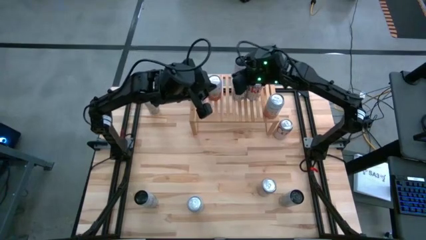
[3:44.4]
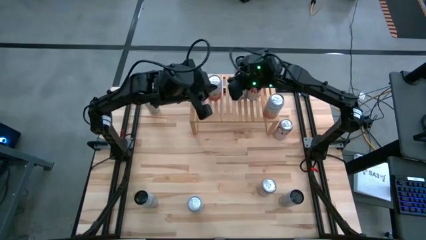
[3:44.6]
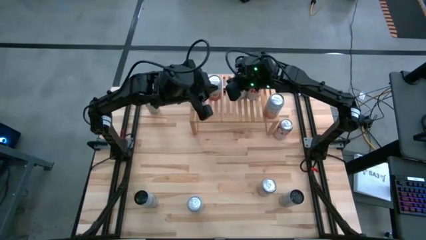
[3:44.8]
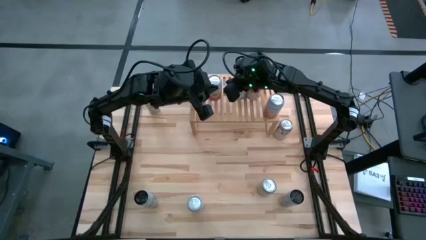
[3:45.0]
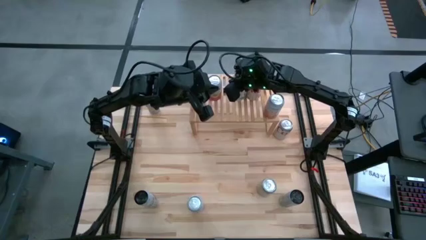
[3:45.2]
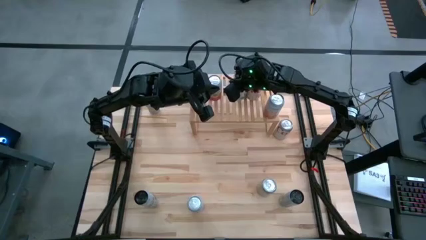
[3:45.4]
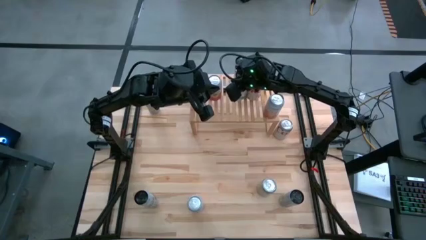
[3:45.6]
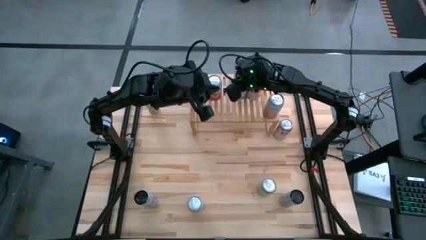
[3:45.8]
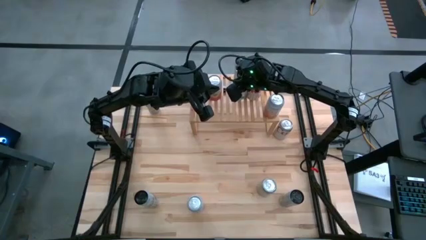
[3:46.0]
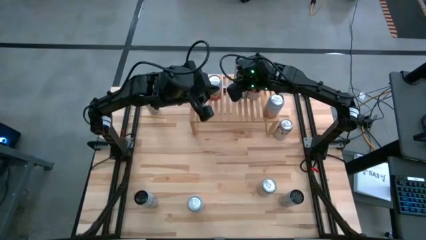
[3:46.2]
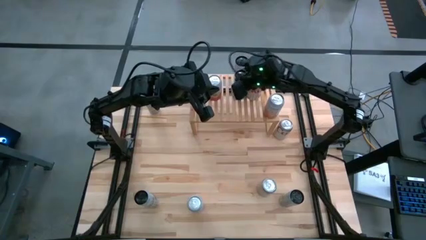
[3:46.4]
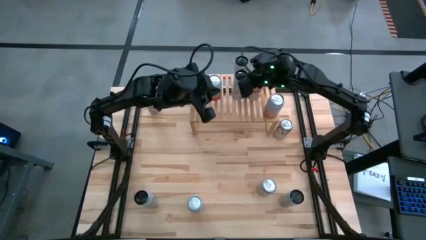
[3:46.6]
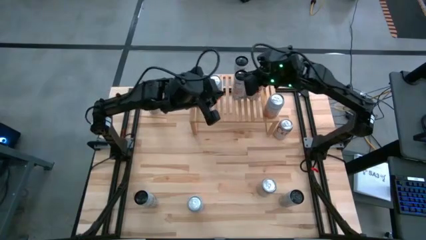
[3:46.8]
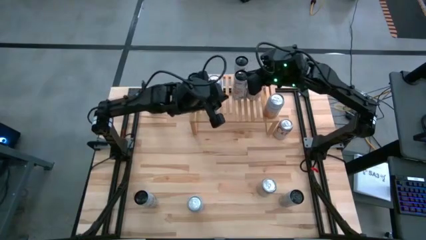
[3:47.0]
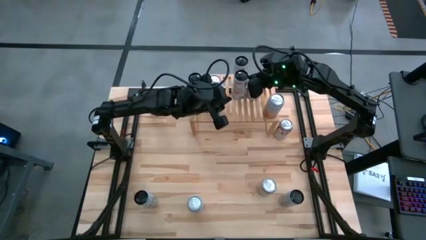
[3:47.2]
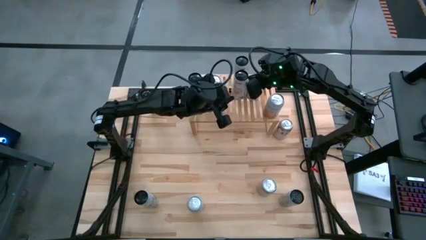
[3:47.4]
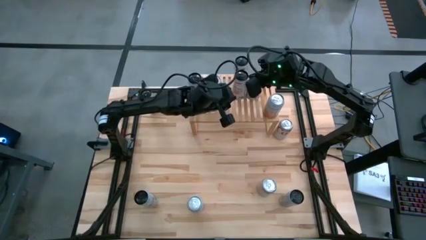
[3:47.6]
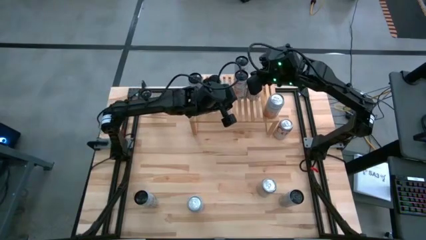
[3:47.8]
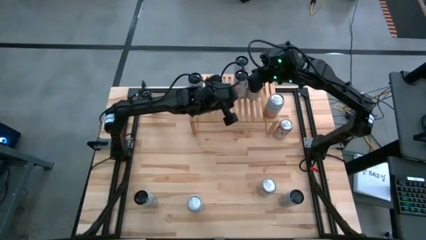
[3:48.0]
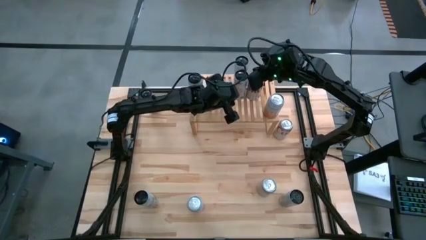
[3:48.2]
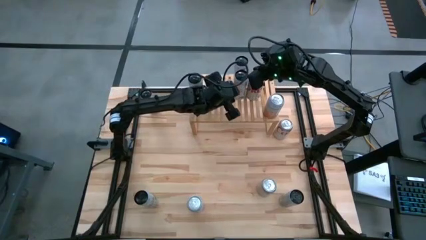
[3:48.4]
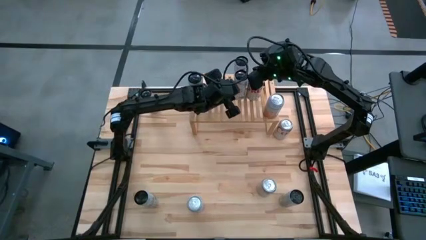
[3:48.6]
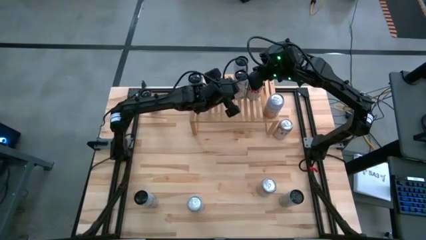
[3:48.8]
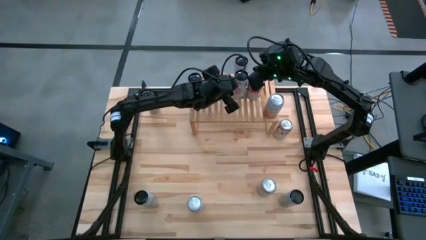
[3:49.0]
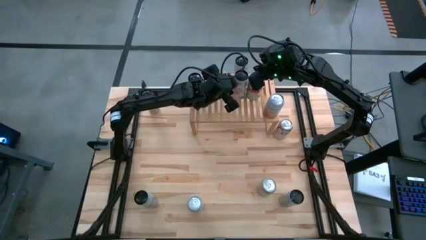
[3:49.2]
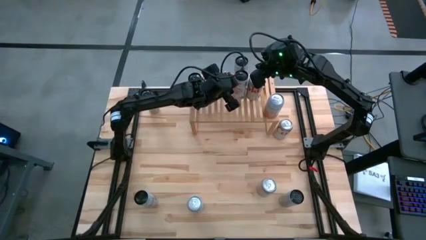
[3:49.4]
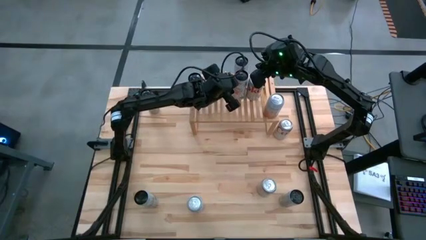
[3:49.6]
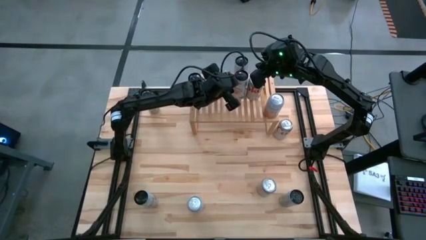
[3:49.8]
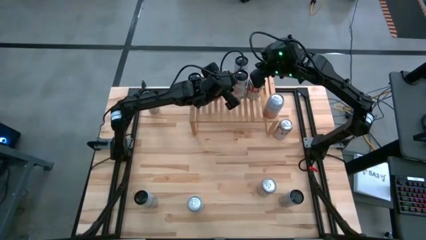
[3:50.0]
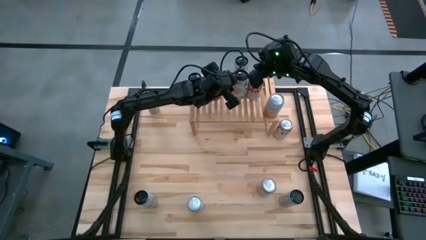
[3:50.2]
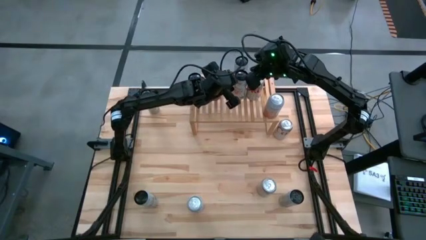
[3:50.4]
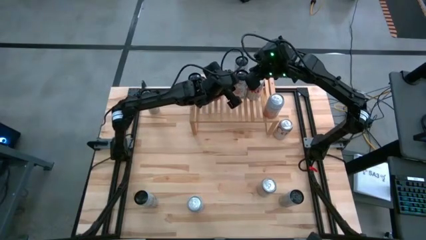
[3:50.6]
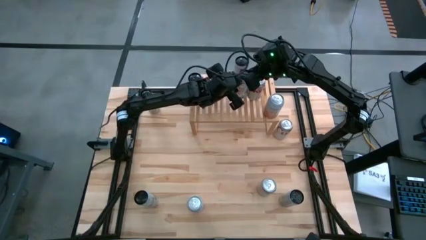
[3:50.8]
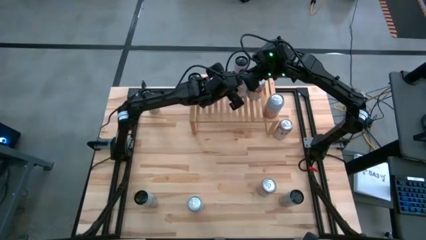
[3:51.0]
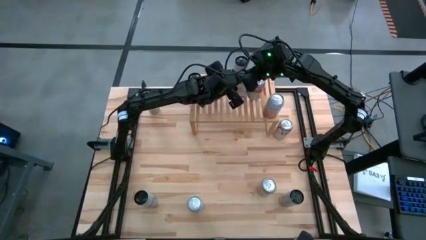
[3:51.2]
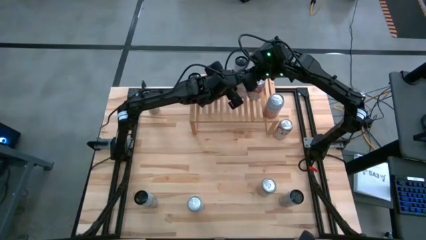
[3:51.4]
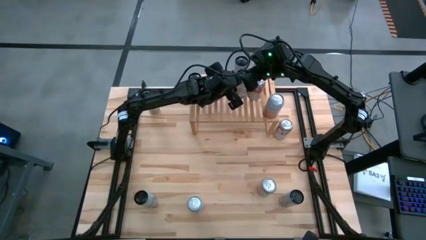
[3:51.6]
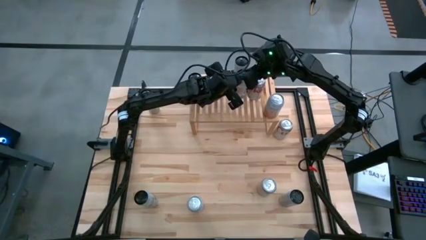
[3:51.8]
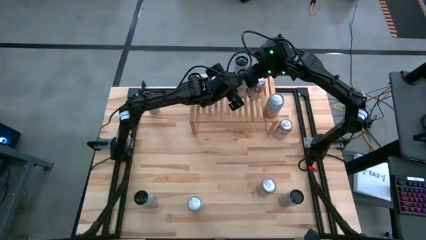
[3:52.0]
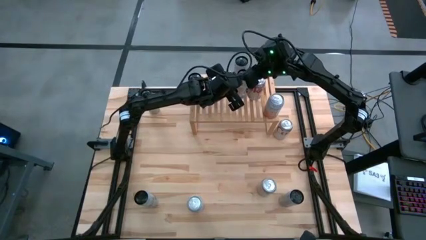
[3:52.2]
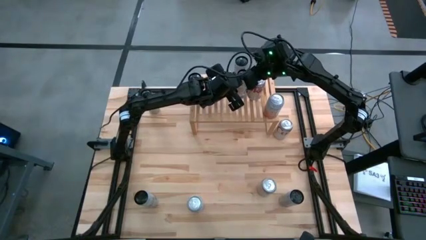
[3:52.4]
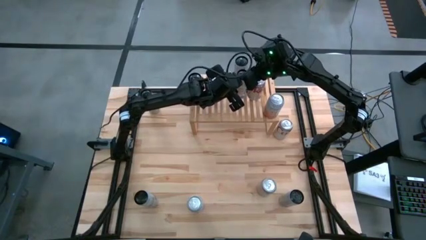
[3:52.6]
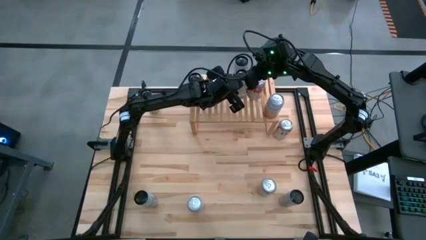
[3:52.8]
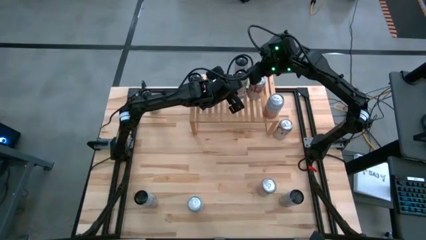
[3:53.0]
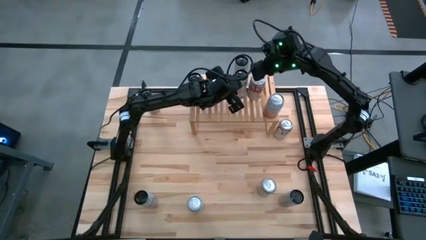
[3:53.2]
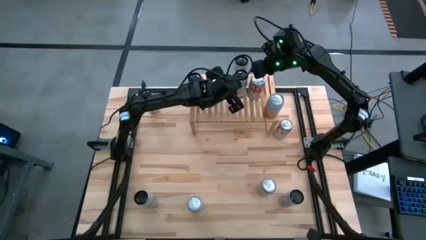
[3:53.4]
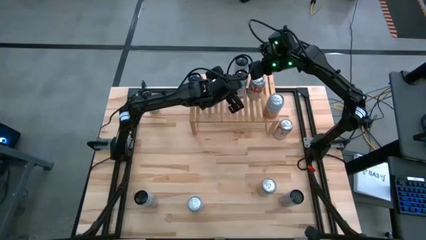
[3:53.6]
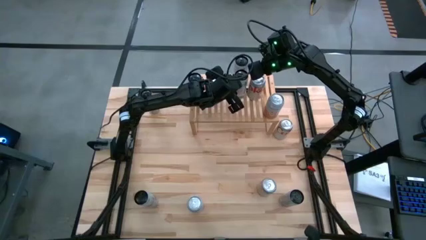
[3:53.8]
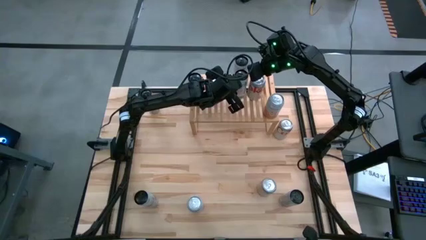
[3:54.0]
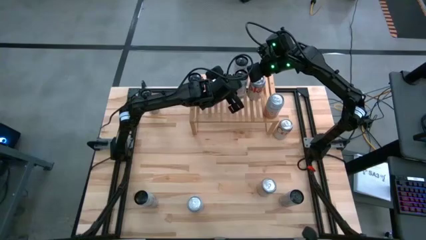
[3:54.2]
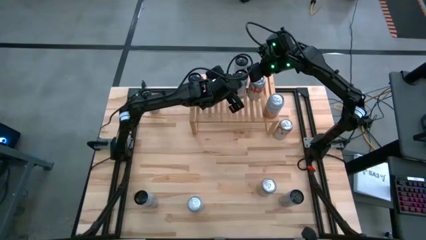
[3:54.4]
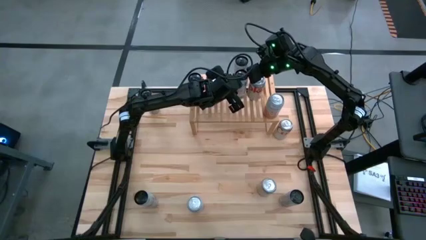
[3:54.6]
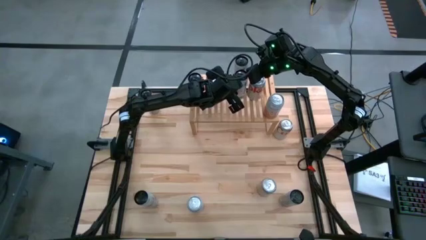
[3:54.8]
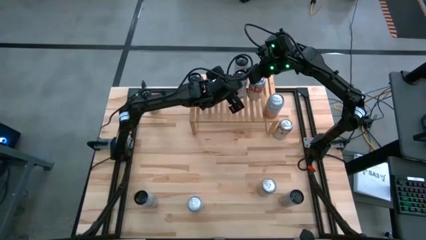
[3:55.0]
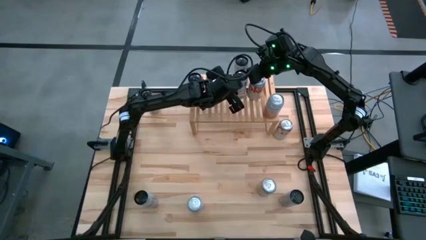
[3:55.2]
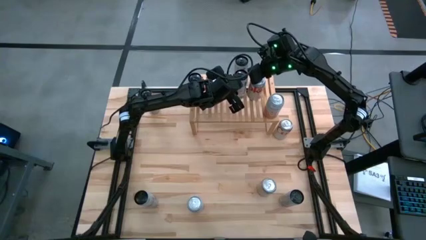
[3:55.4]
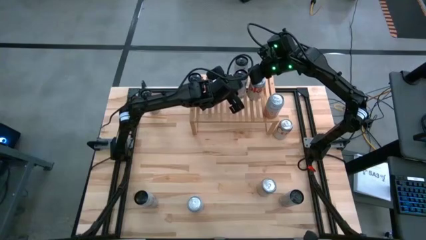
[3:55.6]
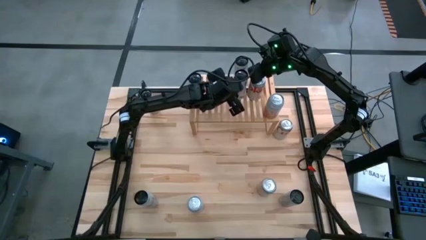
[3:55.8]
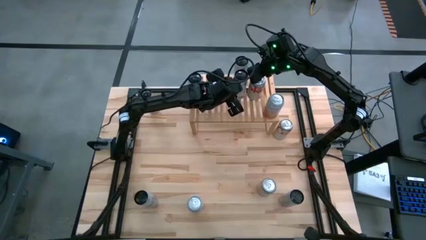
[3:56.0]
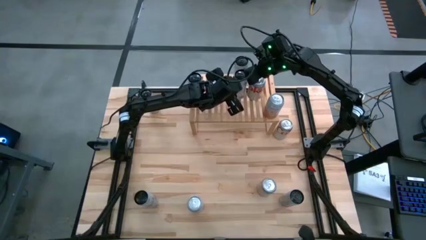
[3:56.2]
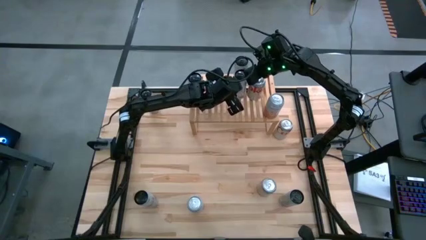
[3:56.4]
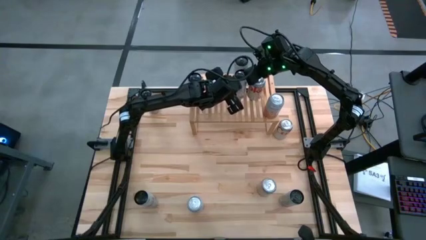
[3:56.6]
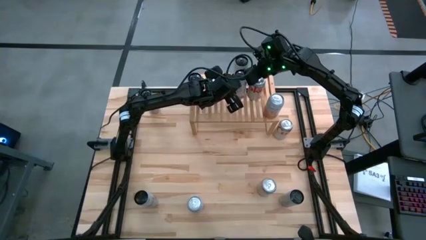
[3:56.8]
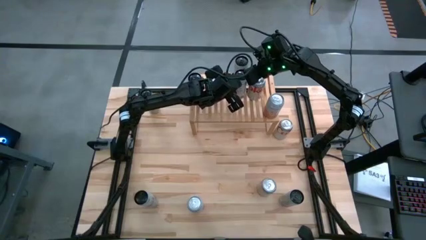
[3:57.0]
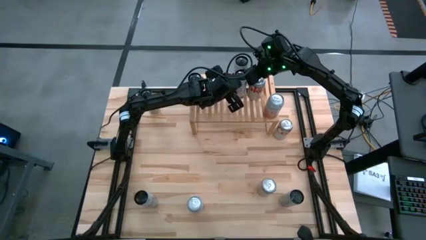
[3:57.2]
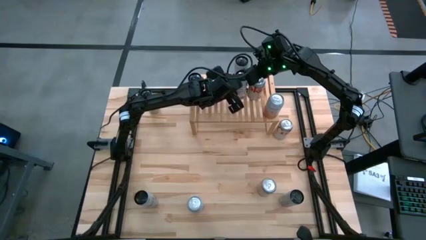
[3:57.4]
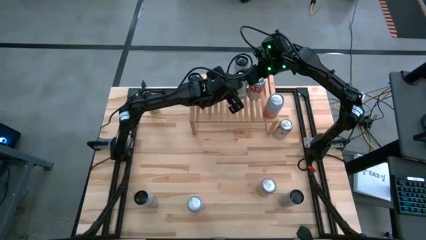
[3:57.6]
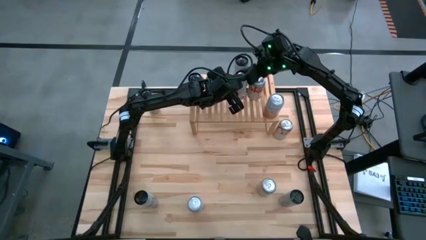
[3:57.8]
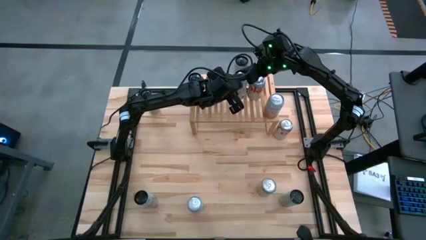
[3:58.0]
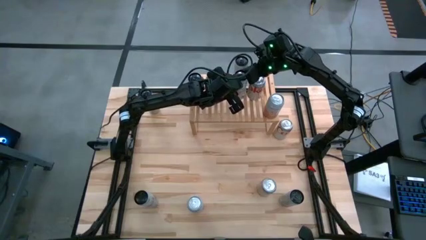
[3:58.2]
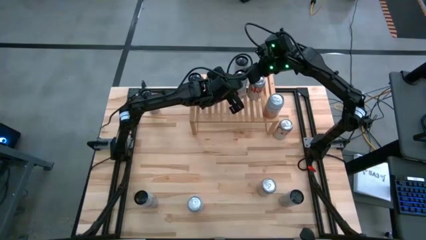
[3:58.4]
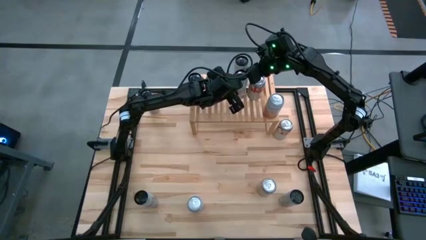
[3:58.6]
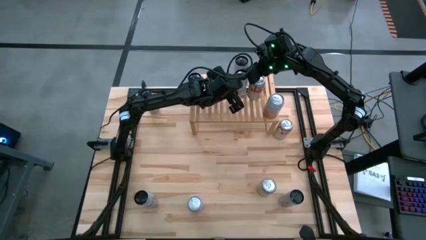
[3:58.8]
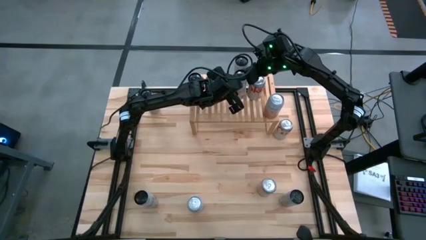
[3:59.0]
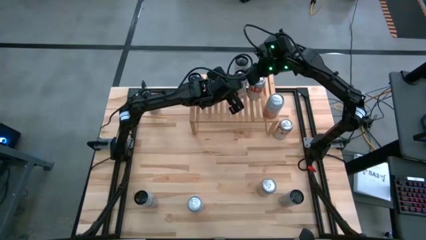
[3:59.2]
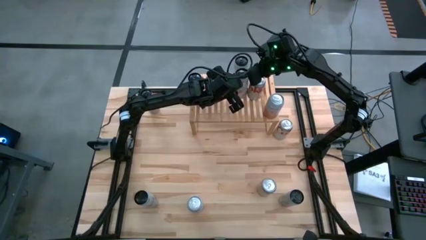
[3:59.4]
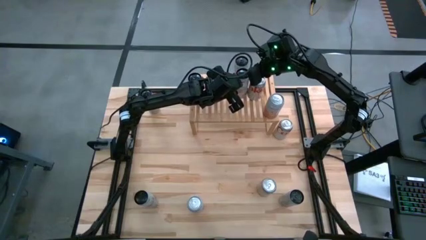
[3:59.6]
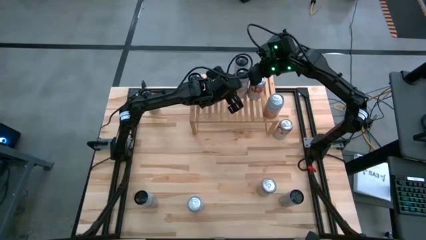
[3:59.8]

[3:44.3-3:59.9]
Task: Place canned beverage on shelf
Put the left white soda can on the shelf aligned with the other white soda can

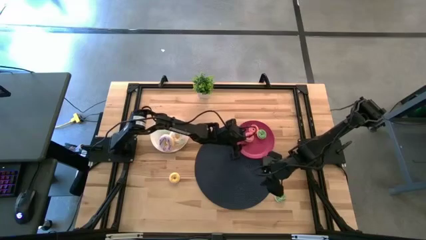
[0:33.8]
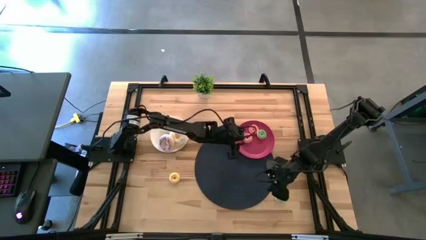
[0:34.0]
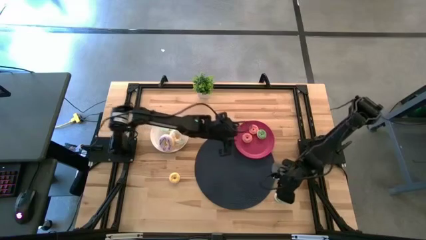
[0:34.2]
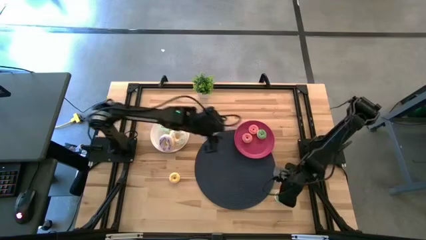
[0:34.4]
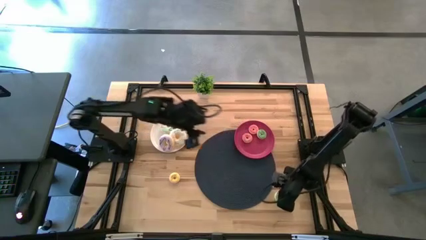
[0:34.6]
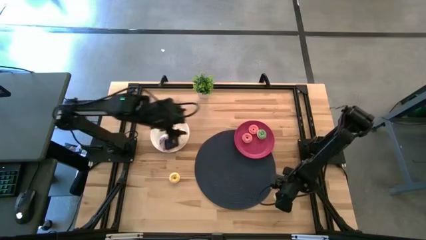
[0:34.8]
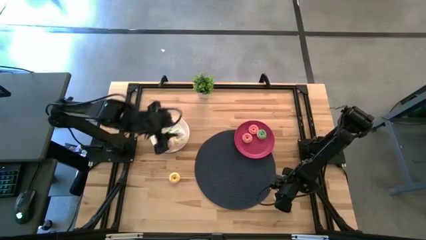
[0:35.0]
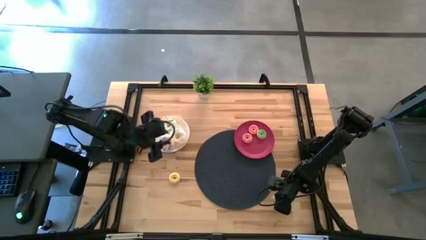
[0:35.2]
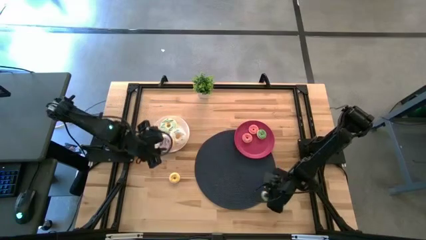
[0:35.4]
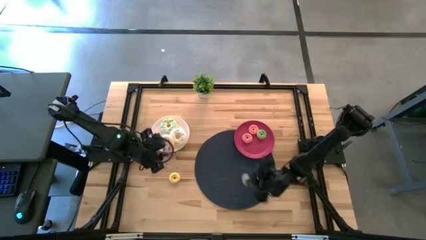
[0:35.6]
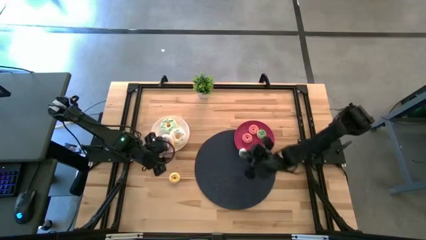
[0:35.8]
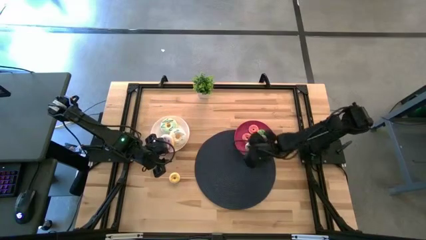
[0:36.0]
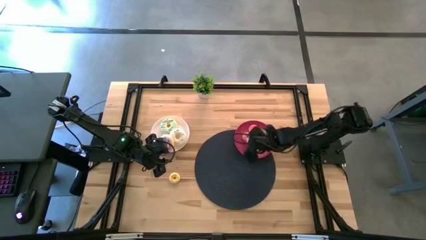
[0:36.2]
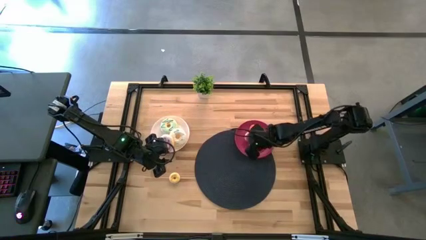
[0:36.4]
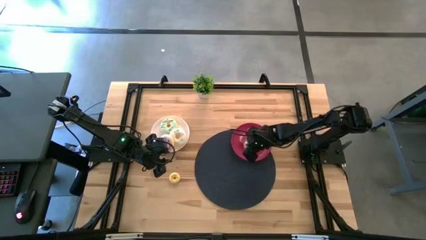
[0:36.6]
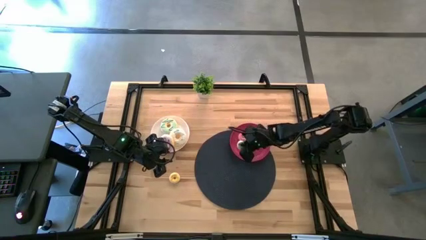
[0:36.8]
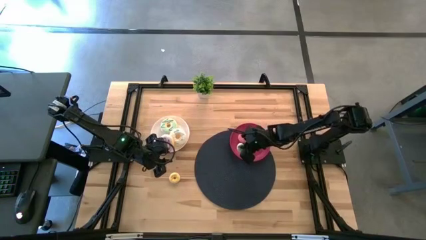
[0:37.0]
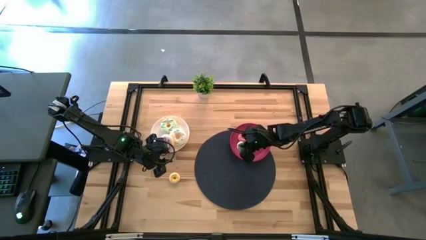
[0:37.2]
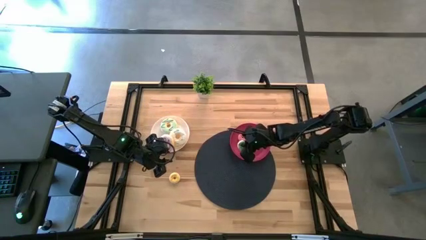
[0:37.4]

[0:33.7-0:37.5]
Task: Pick & Place donuts
Put the small green donut onto the red plate
